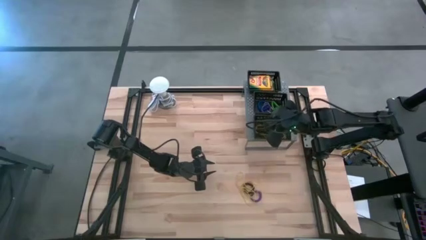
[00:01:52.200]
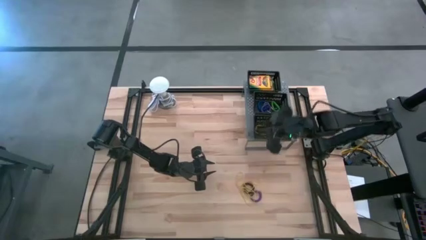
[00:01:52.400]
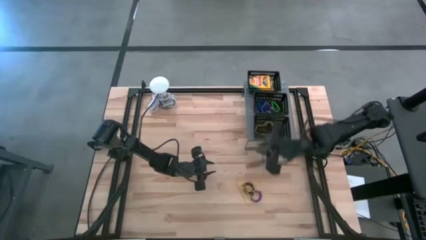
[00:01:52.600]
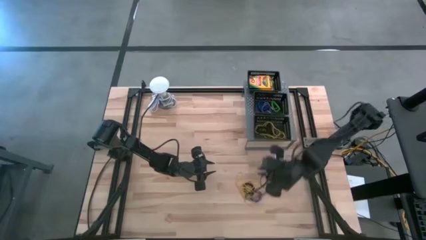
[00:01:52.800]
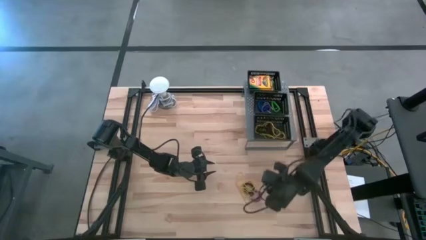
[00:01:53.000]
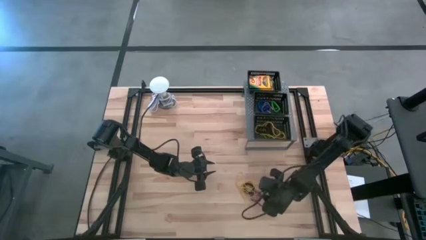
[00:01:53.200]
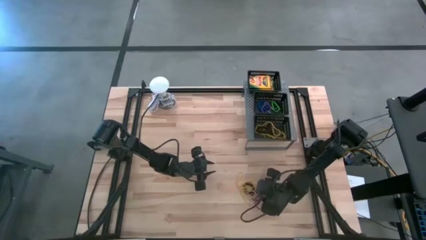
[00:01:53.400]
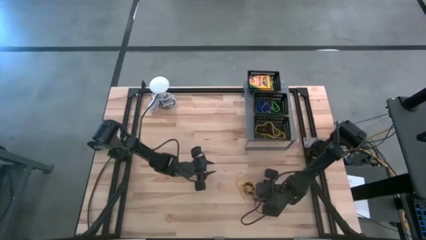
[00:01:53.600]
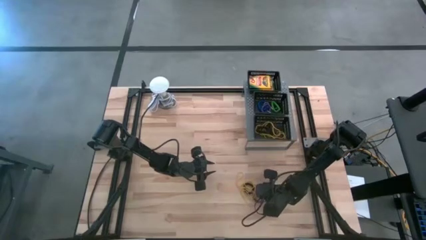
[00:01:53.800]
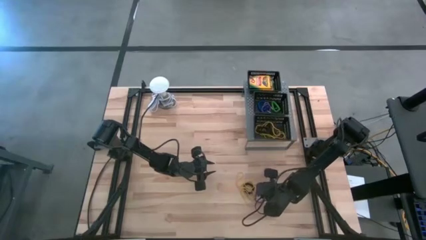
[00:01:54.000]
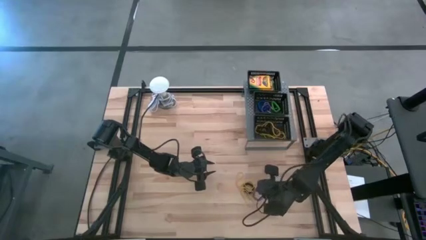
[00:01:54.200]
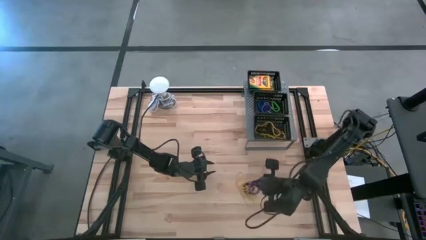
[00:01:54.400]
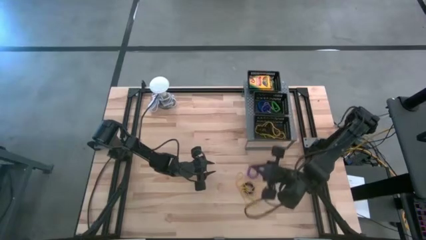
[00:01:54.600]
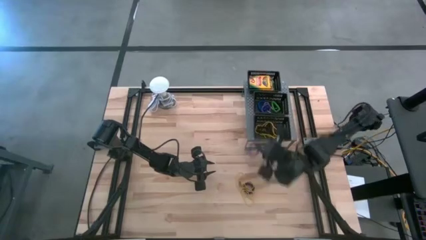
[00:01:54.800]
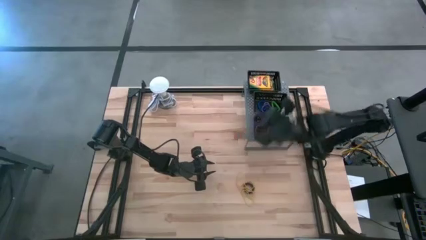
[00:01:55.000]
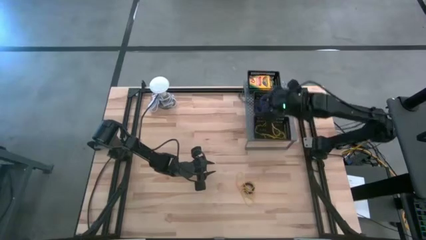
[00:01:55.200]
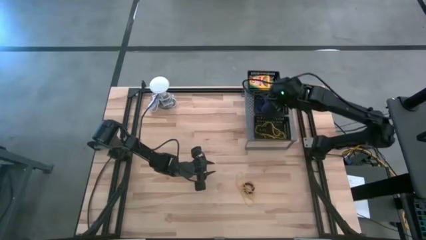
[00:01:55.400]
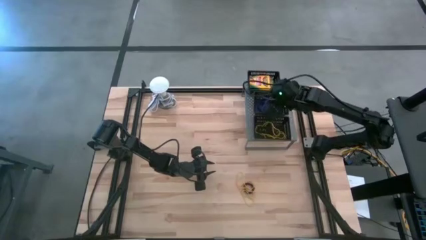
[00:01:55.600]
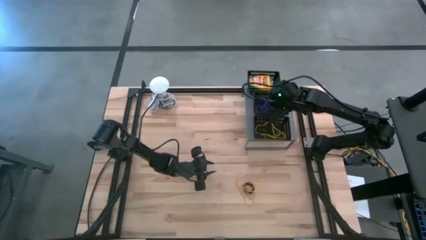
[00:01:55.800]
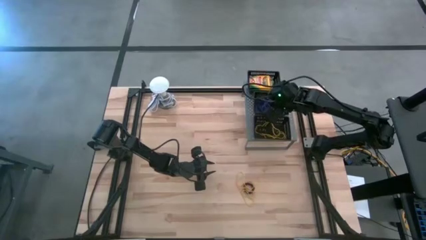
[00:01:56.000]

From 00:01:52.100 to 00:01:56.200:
Task: Pick & Place Office Desk Supplies
Put the violet spring keychain into the middle black bin on the shelf

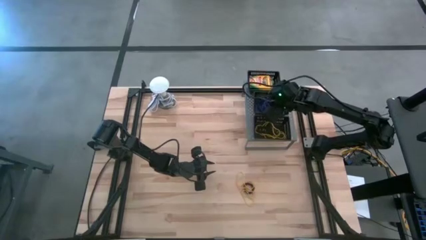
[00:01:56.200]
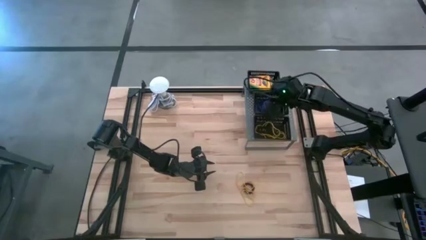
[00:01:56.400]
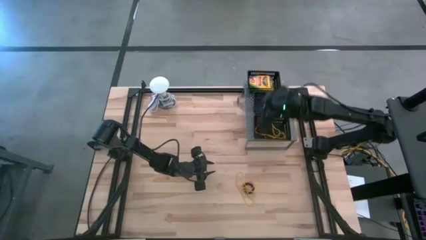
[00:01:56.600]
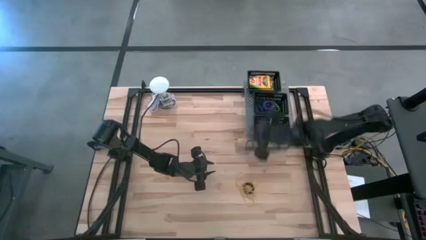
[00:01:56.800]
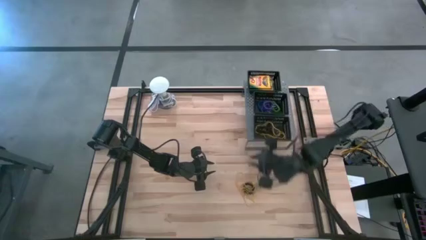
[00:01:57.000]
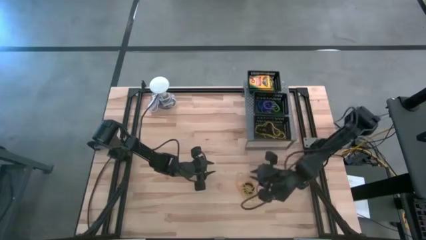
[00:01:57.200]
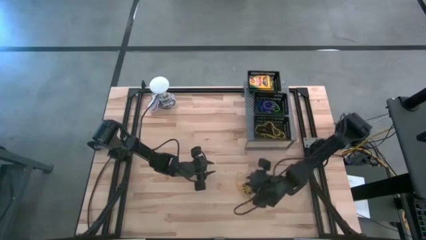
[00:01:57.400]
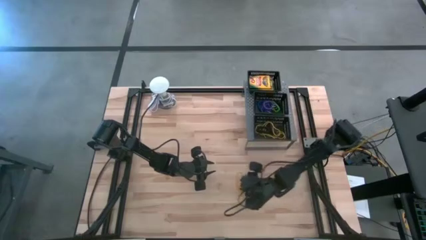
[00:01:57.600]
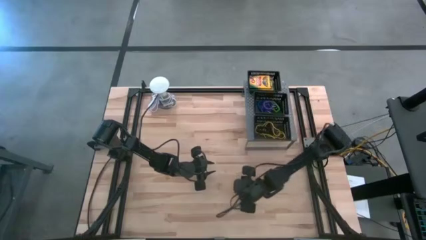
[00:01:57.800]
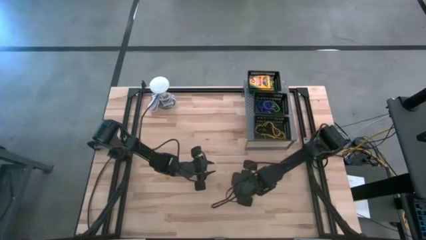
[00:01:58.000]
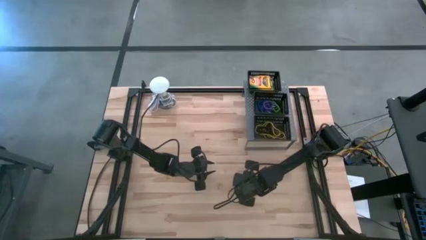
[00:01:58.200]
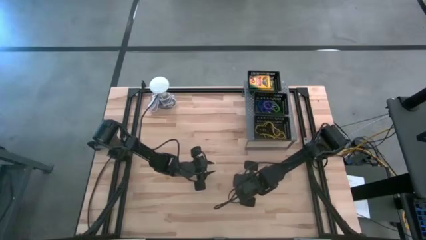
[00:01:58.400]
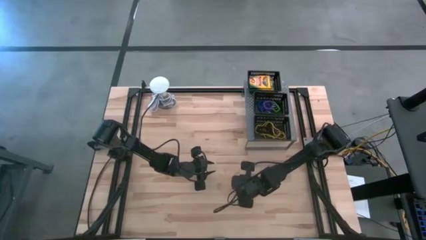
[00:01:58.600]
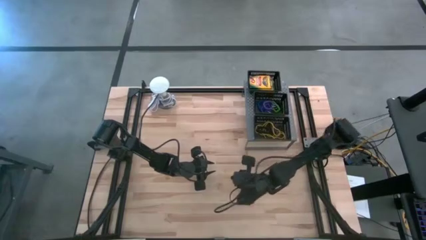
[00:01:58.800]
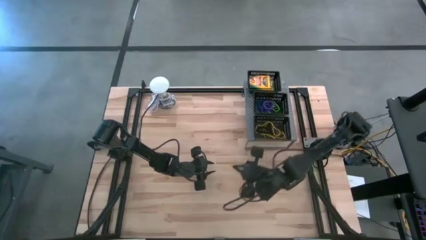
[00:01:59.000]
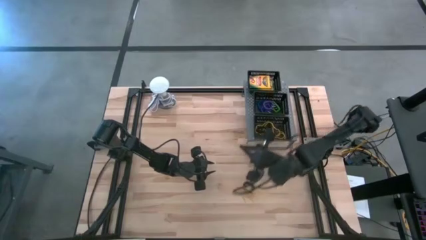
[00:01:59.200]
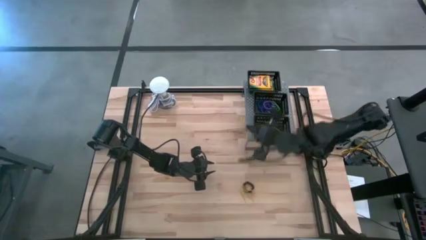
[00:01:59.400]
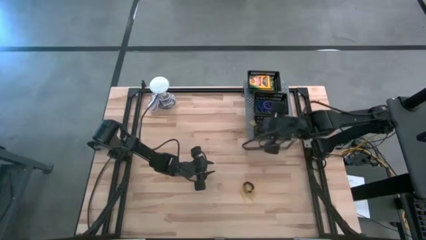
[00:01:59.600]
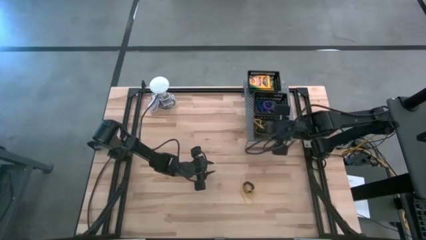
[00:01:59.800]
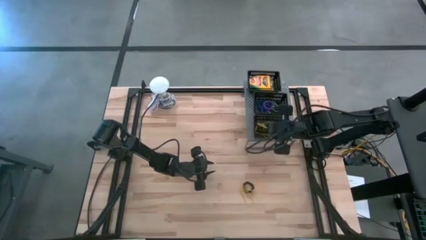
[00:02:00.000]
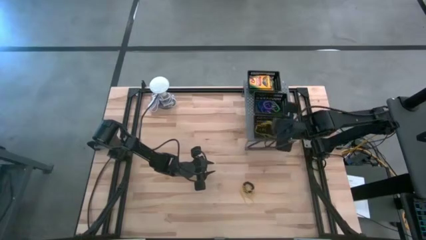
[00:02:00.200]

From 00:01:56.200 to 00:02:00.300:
Put the yellow rubber band into the bottom black bin on the shelf

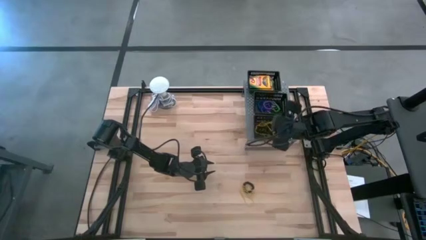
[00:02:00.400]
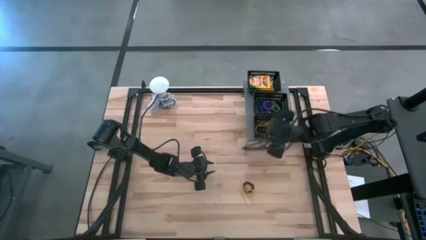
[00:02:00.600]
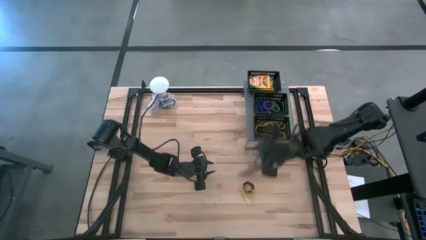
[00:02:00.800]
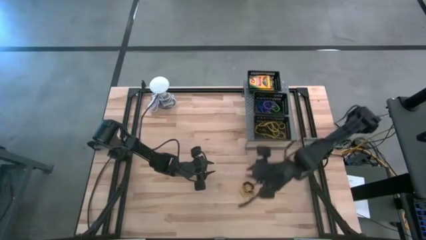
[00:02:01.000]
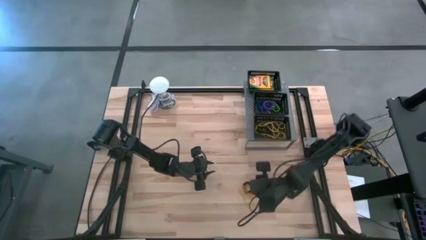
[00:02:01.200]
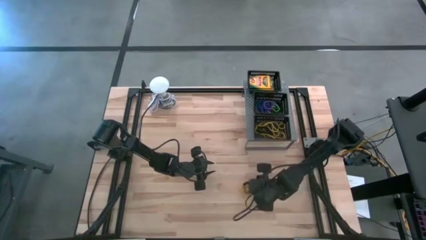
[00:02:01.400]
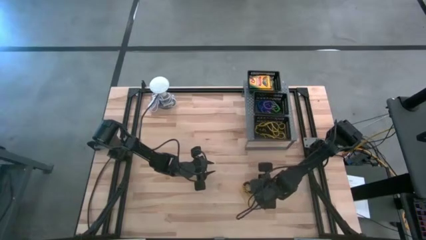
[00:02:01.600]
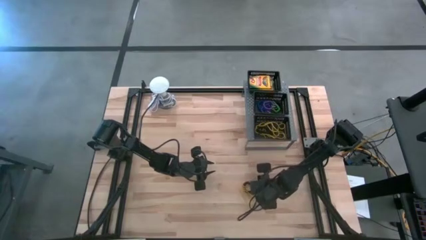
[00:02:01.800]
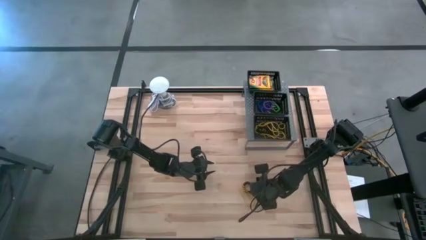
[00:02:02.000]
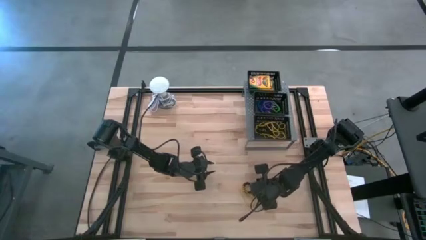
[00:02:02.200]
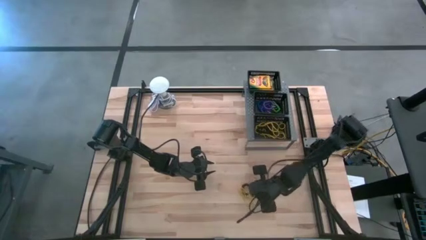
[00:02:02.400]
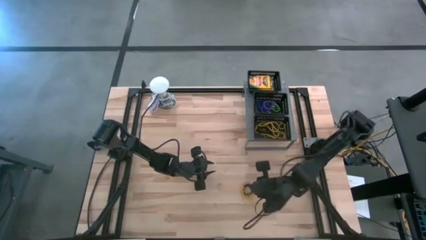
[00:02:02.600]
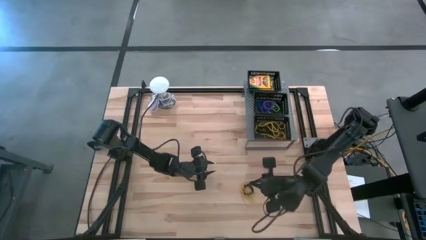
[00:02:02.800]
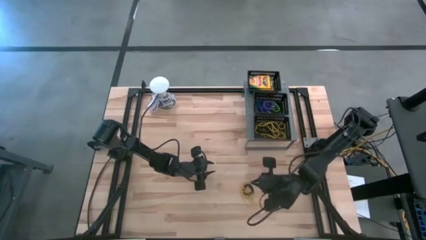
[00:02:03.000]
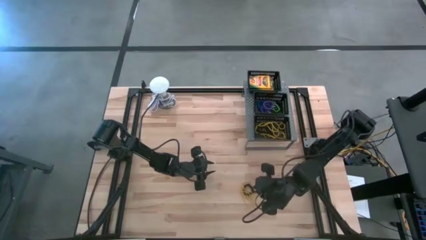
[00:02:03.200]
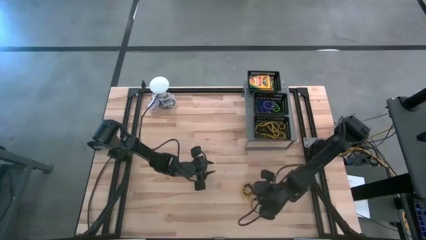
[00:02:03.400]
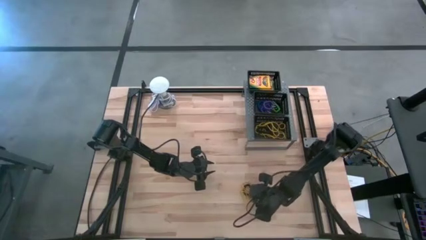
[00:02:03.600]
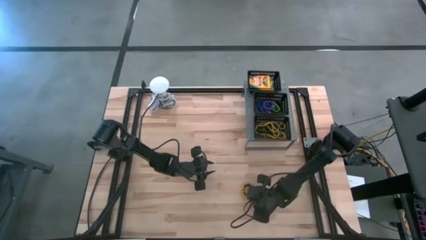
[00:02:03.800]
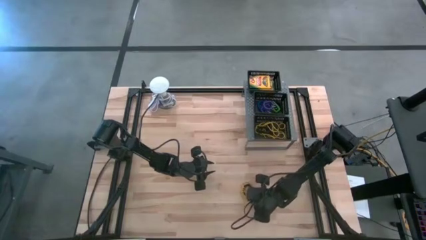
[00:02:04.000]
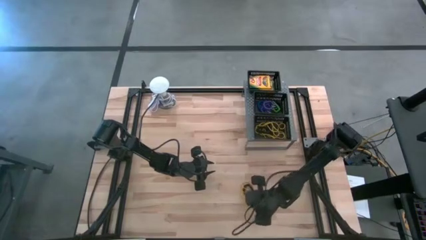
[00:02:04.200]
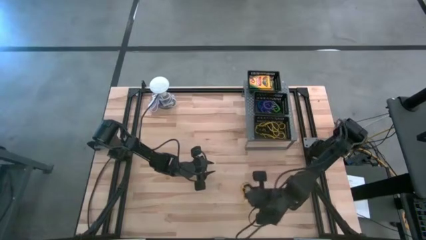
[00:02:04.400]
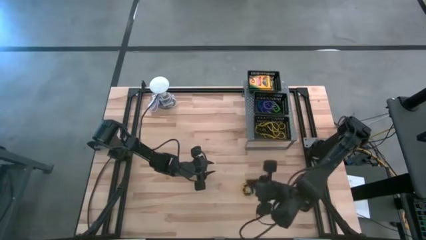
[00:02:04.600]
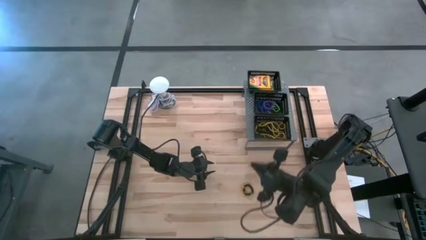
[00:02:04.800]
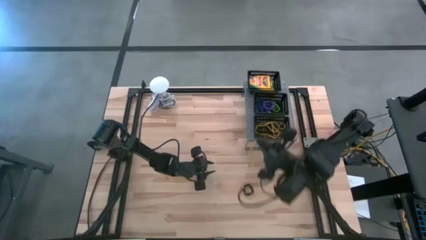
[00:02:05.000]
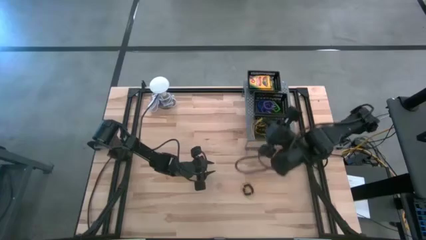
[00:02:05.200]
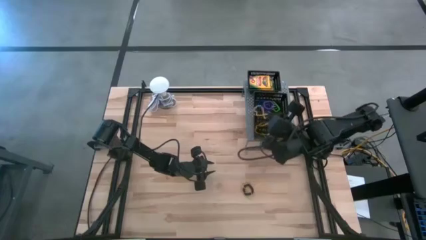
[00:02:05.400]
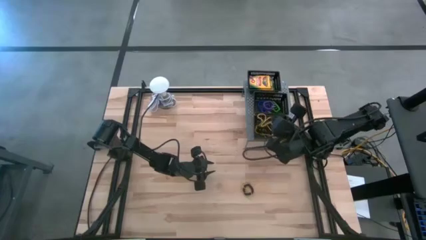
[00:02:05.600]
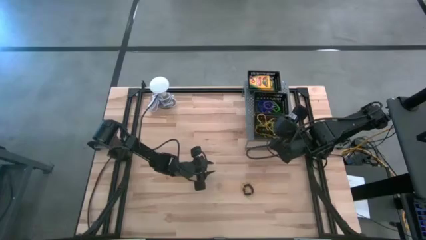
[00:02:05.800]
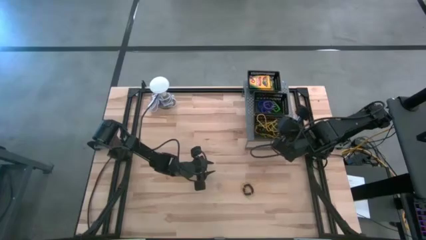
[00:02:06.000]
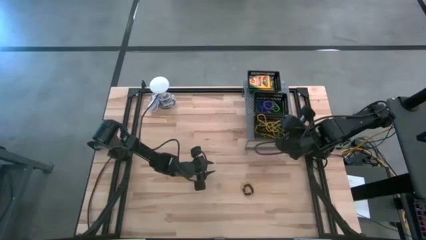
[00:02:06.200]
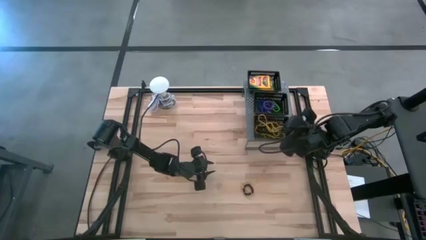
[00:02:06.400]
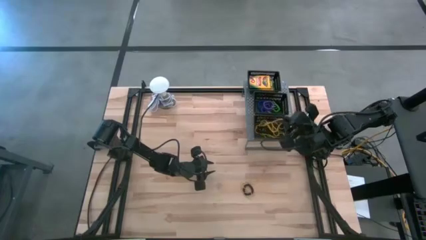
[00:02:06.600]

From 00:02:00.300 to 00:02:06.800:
Put the yellow rubber band into the bottom black bin on the shelf

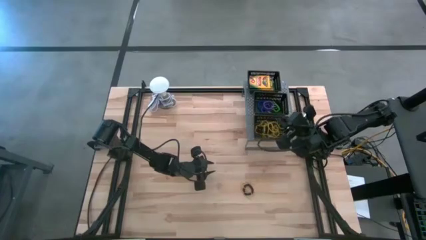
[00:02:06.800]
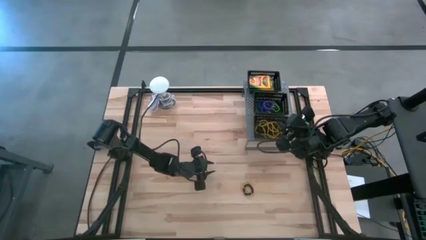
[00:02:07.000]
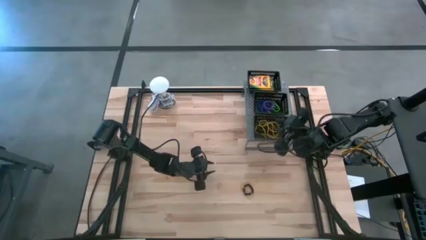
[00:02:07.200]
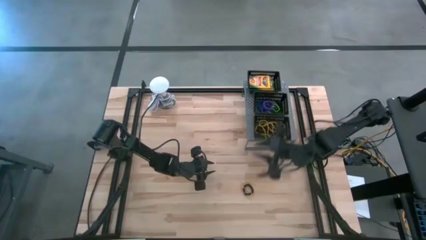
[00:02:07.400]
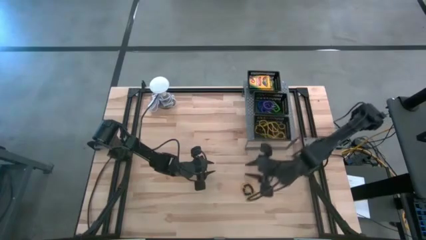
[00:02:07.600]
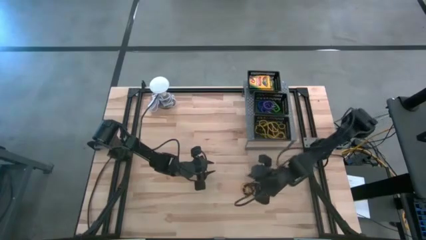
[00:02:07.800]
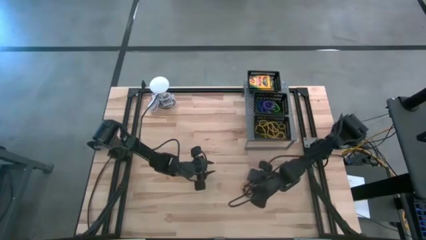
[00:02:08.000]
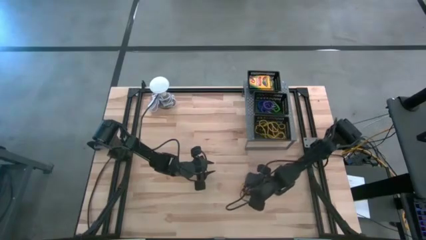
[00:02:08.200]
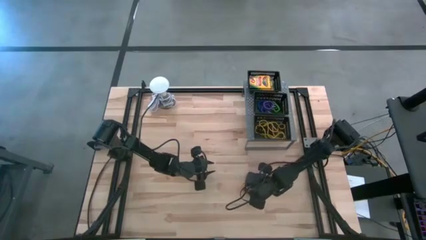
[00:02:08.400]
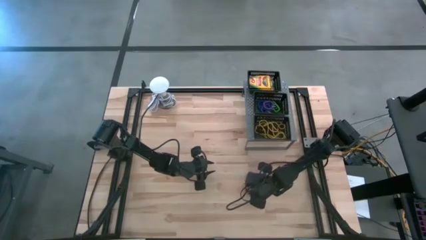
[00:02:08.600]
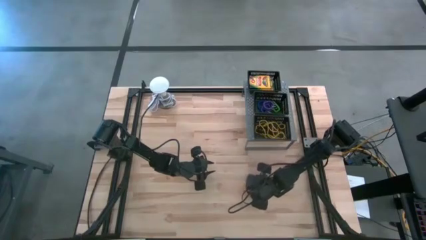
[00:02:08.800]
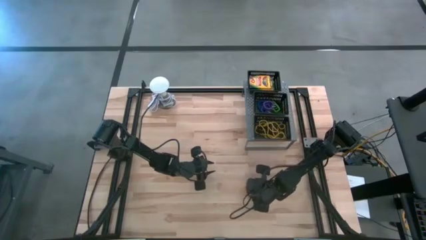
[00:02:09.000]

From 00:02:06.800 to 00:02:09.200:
Put the black spring keychain into the middle black bin on the shelf
